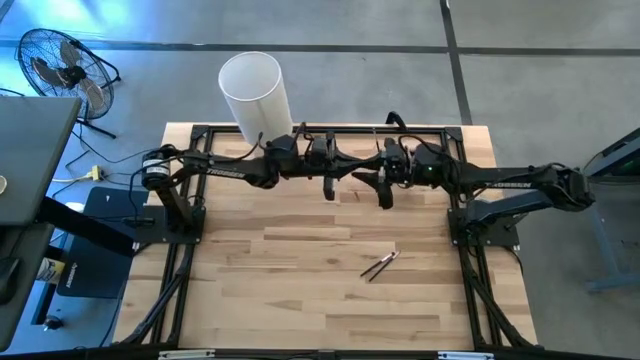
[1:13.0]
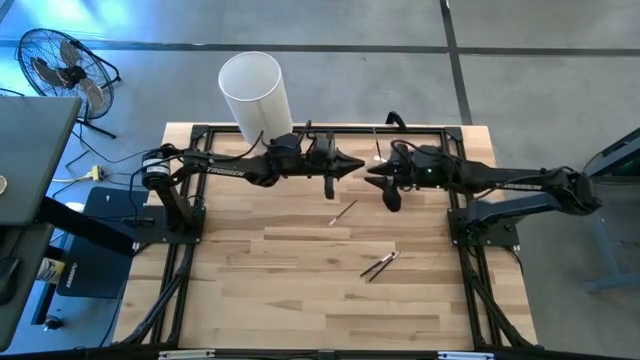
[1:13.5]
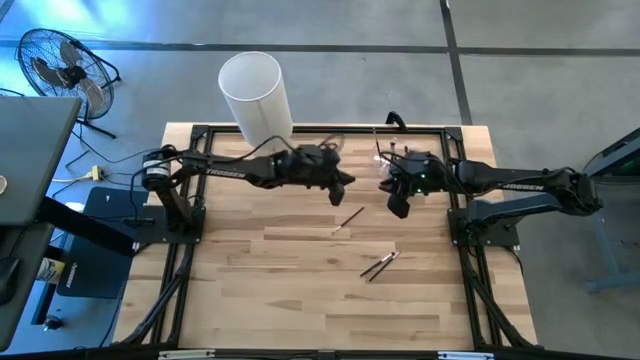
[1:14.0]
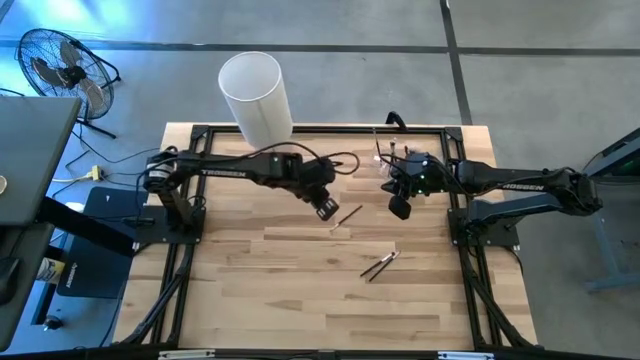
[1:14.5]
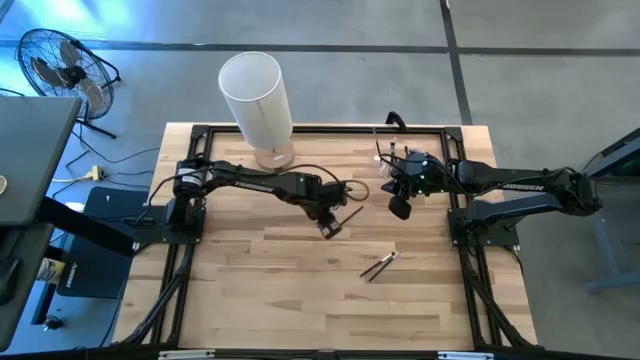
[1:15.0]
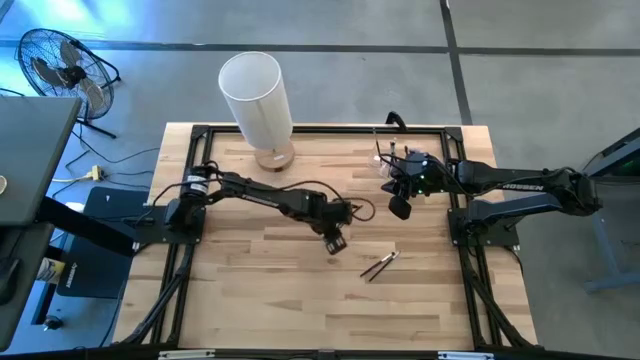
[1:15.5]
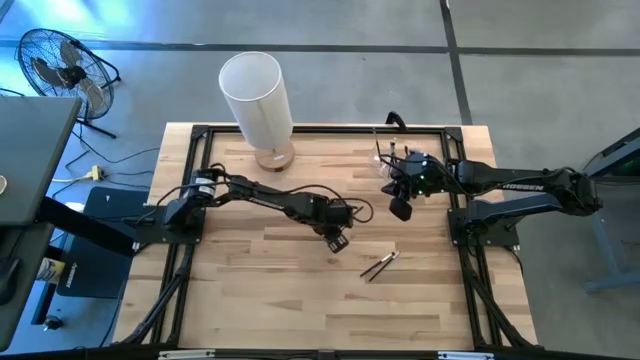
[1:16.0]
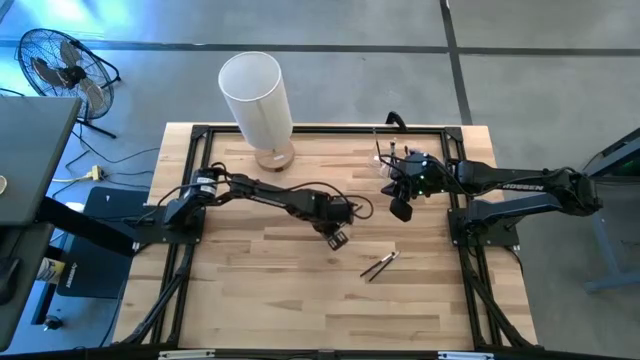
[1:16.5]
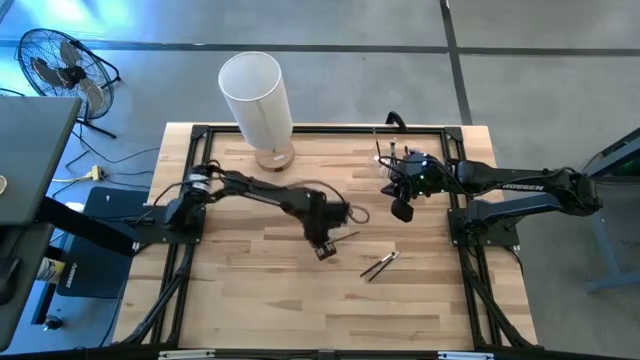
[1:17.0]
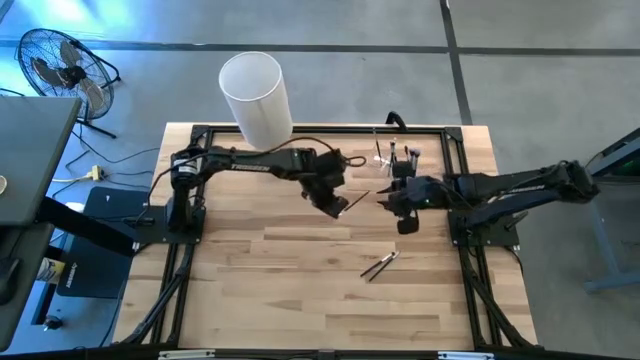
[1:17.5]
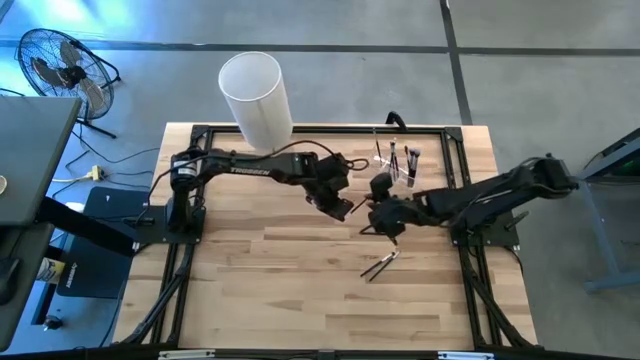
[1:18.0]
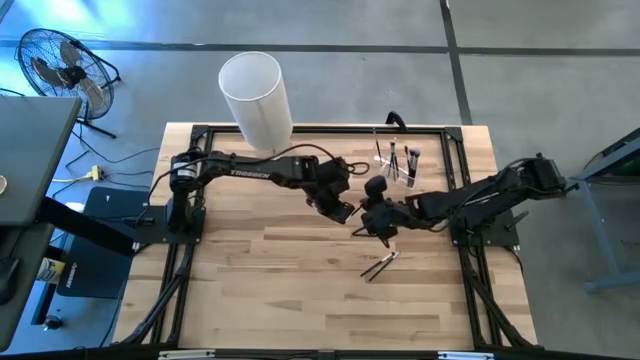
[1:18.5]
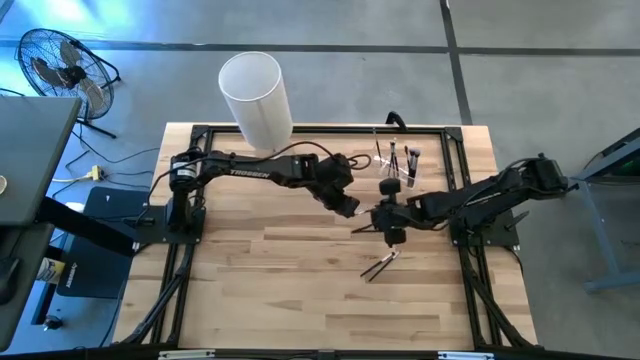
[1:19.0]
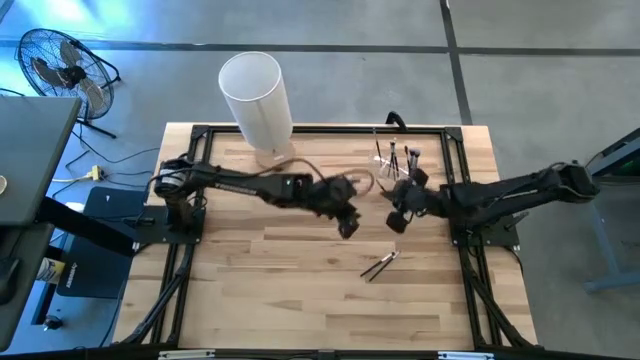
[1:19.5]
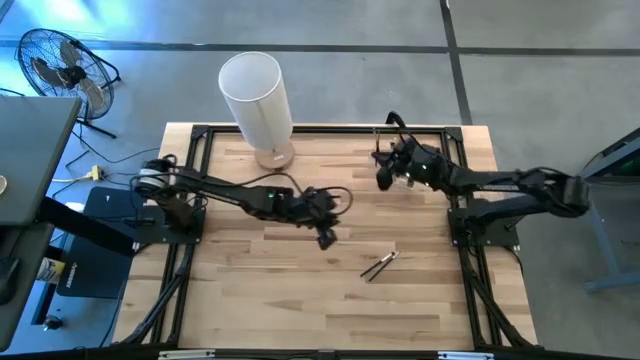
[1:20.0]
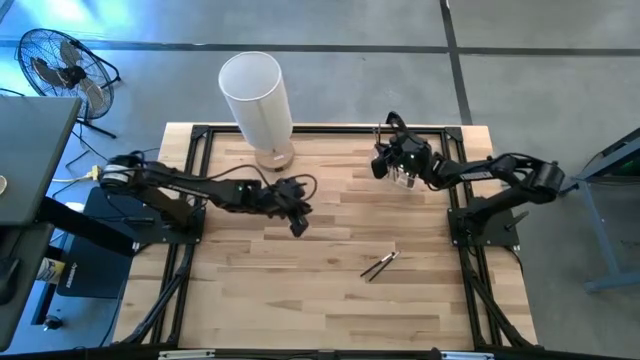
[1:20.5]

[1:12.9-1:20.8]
Task: Put items in baskets/containers
Put the eyeshadow brush into the transparent organizer

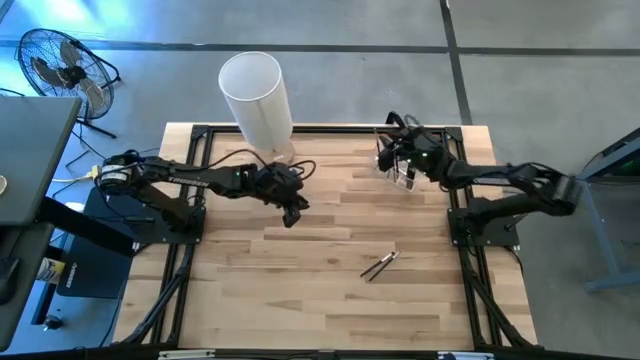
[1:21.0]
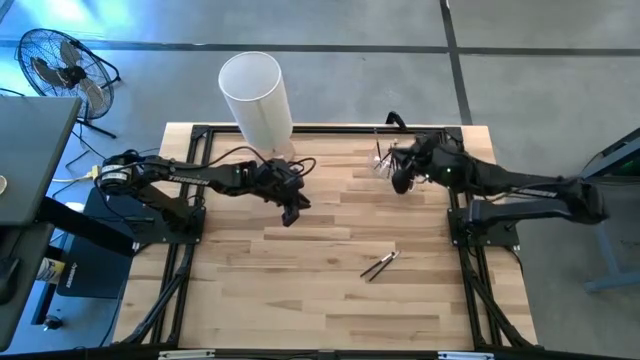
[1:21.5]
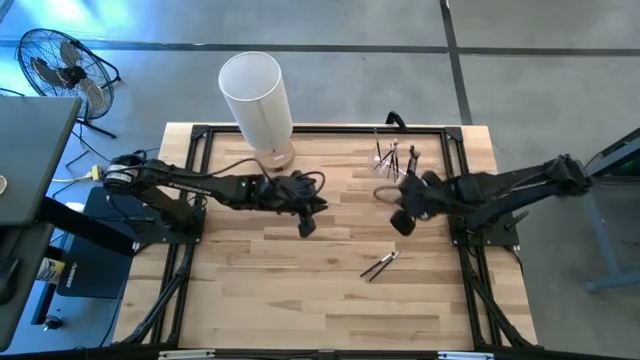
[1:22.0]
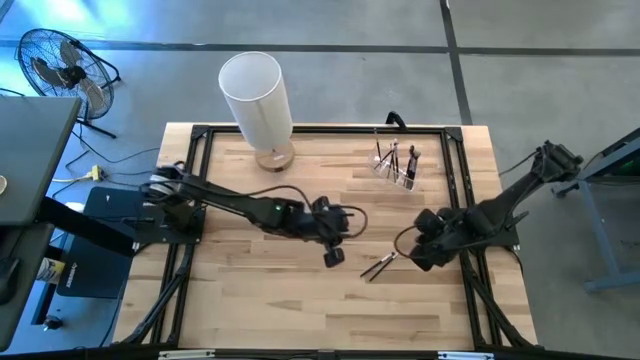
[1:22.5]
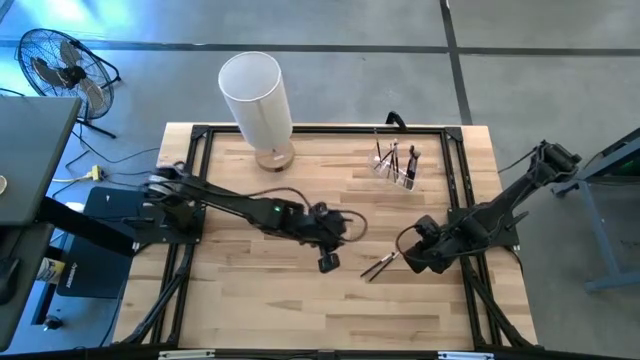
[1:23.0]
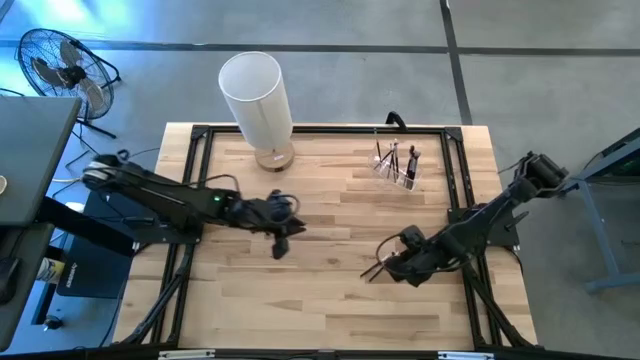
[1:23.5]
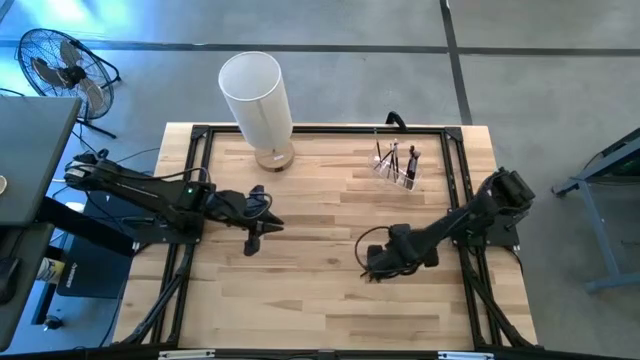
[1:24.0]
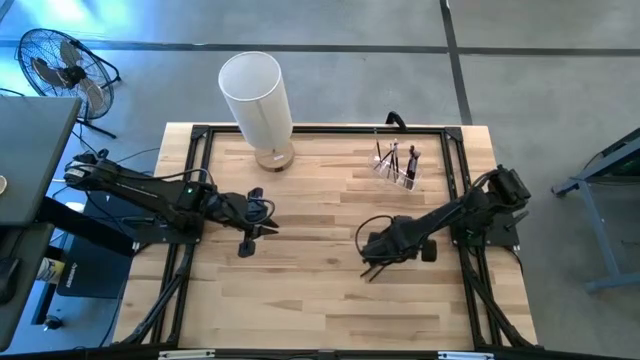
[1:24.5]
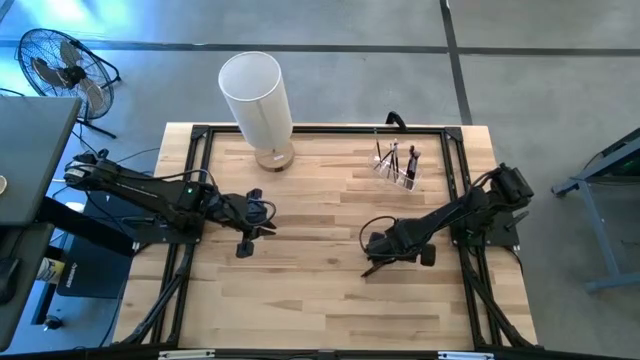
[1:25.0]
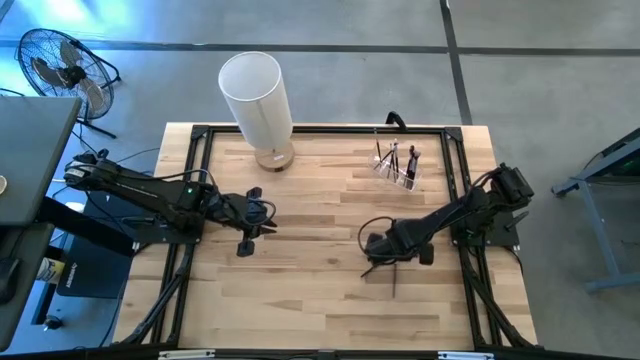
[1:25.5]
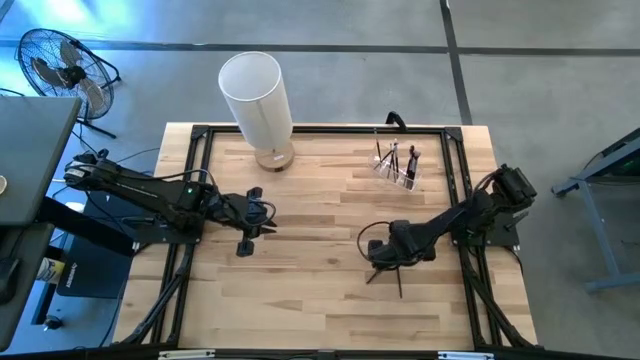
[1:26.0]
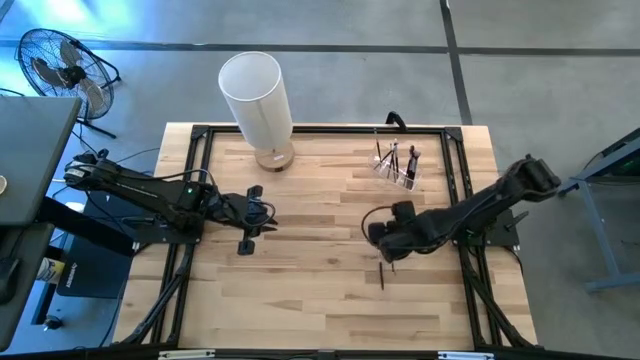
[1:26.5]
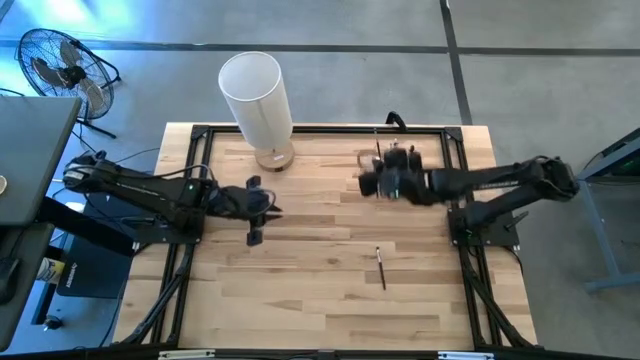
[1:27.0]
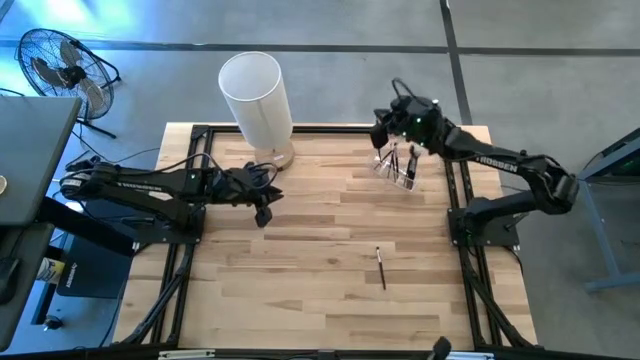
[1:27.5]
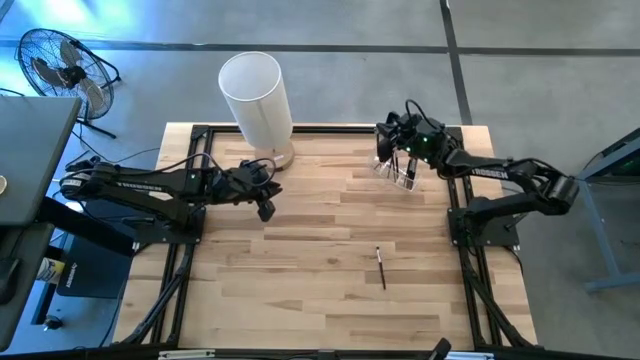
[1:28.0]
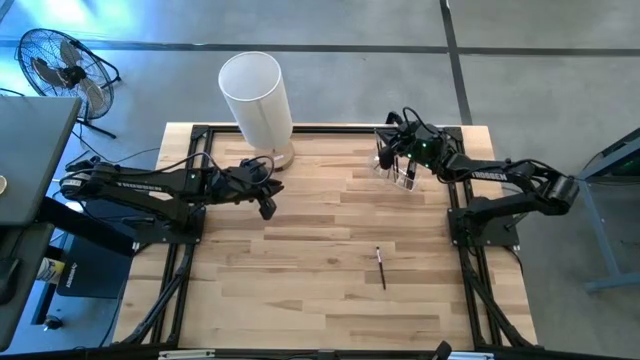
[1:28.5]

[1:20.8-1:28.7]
Put the liner brush into the transparent organizer

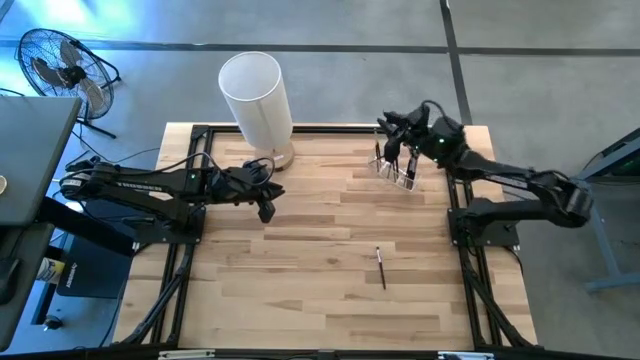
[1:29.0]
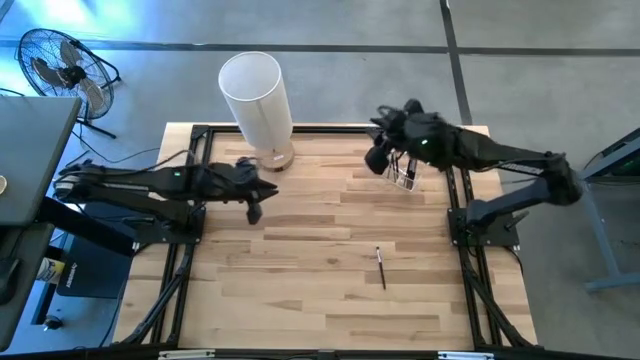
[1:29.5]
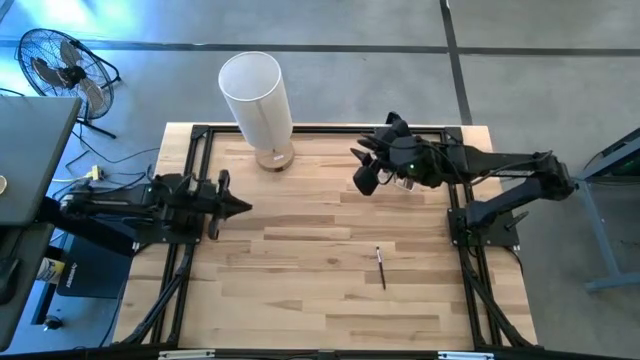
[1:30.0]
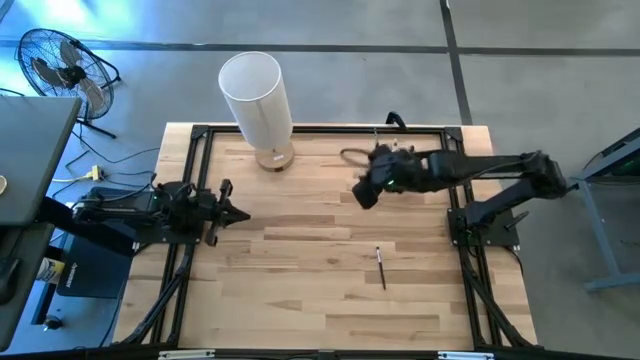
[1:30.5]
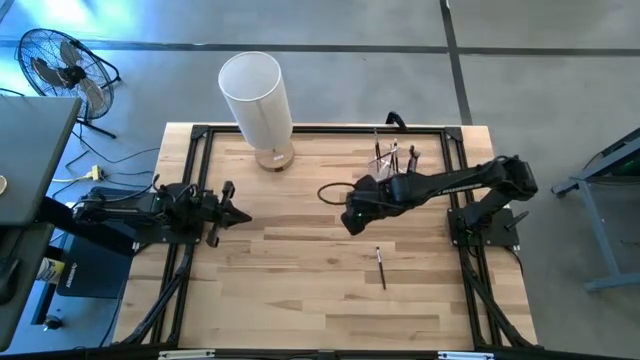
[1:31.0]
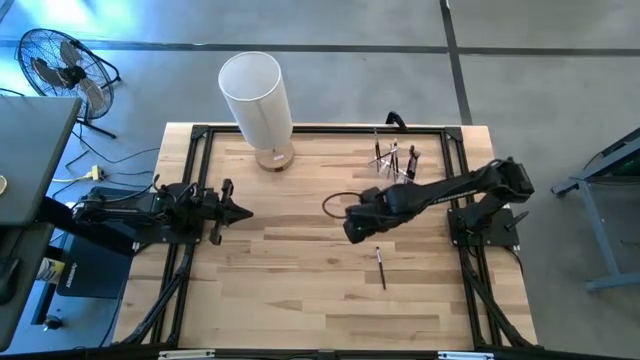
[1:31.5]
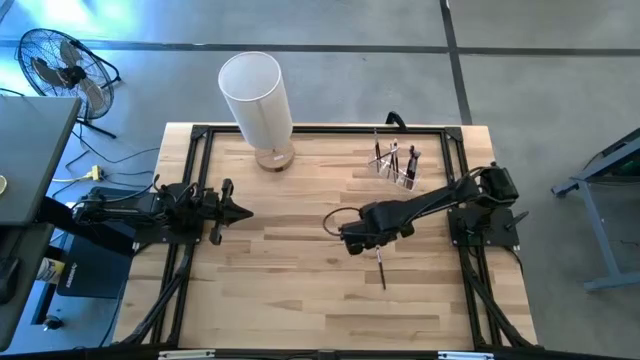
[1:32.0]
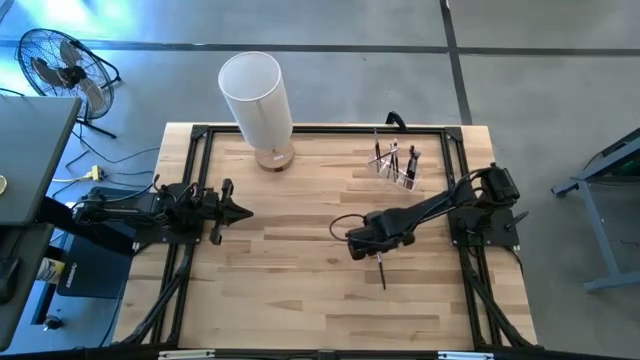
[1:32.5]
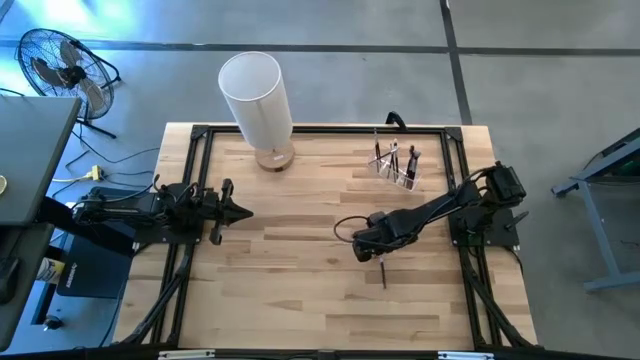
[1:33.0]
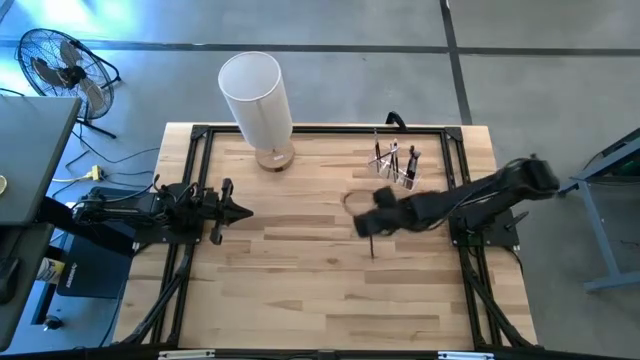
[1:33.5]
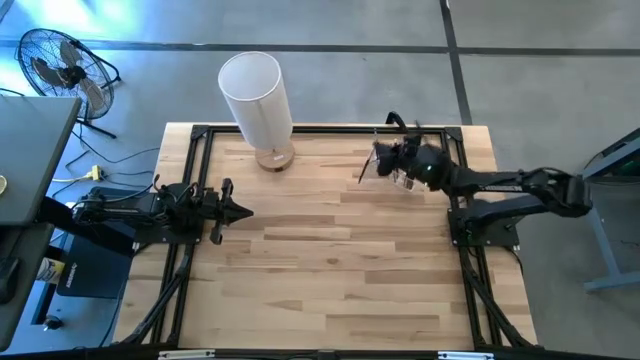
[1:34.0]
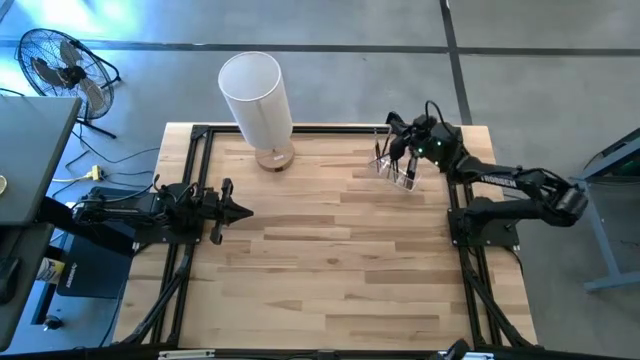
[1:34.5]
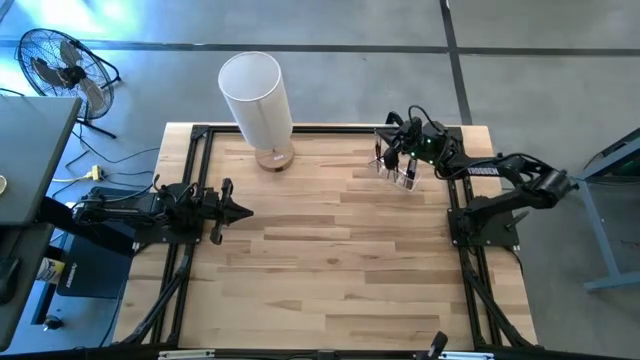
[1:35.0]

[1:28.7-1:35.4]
Put the eyeshadow brush into the transparent organizer
